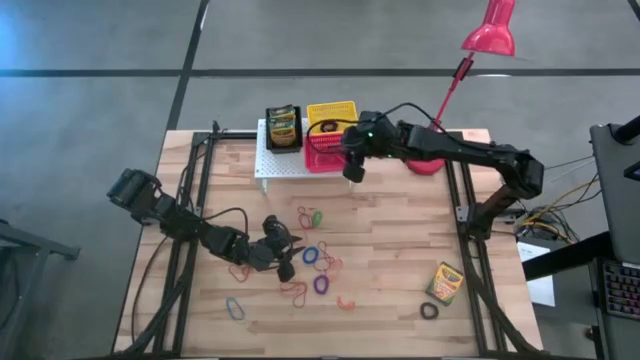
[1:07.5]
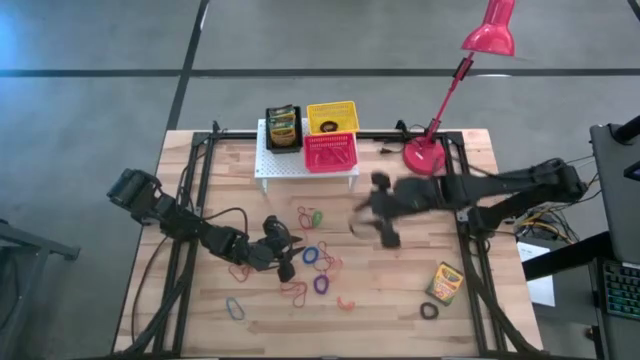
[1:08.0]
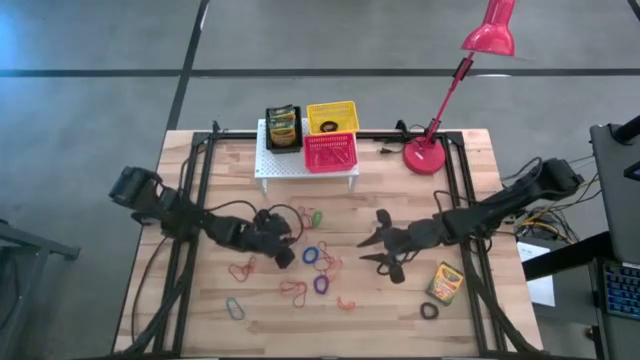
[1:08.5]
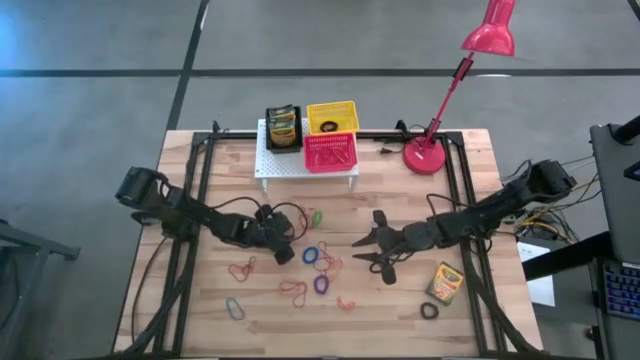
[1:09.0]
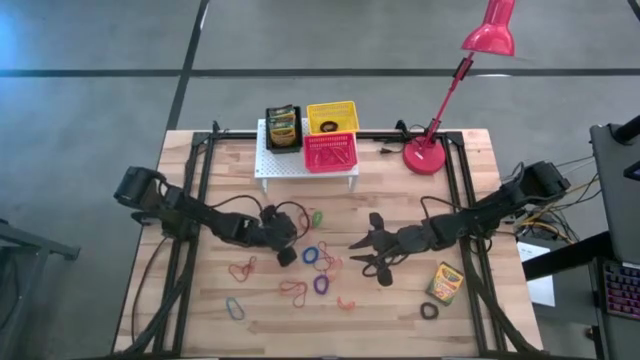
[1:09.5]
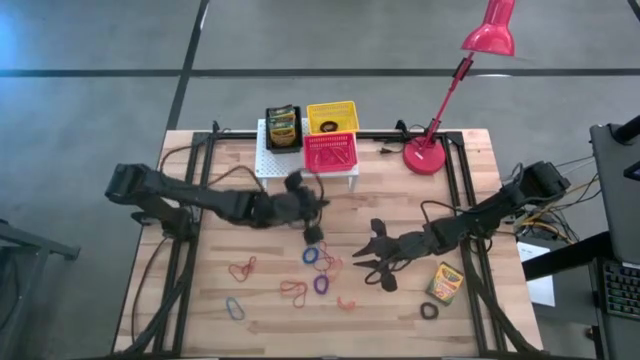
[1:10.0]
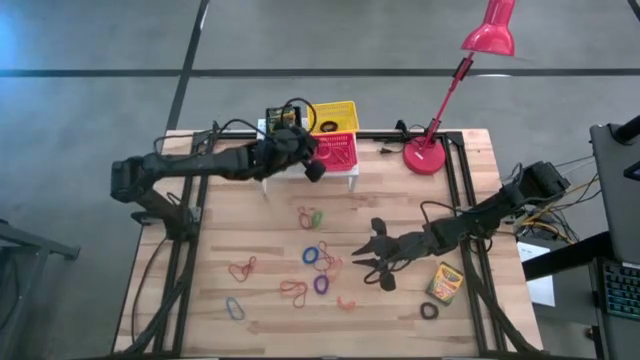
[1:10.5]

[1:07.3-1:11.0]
Task: Pick & Place Office Desk Supplies
Put the orange rubber band into the red bin on the shelf

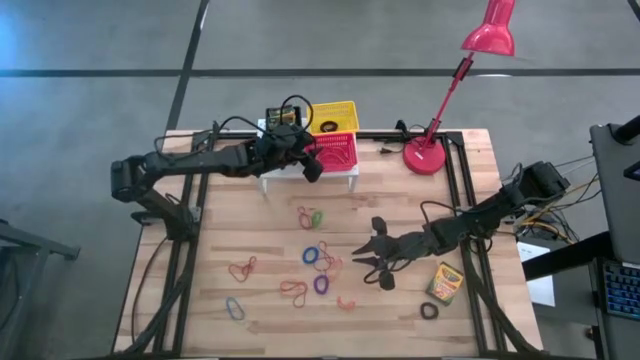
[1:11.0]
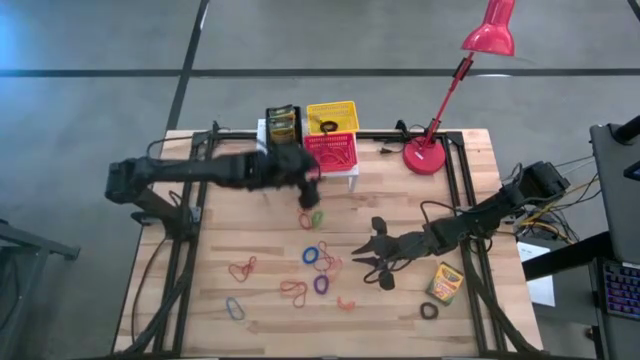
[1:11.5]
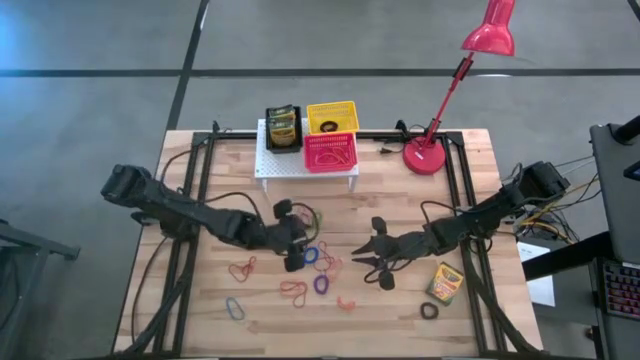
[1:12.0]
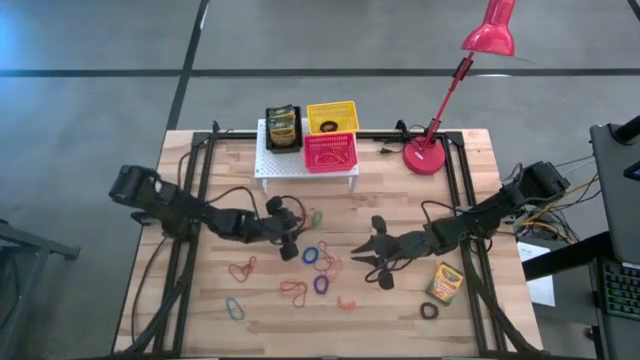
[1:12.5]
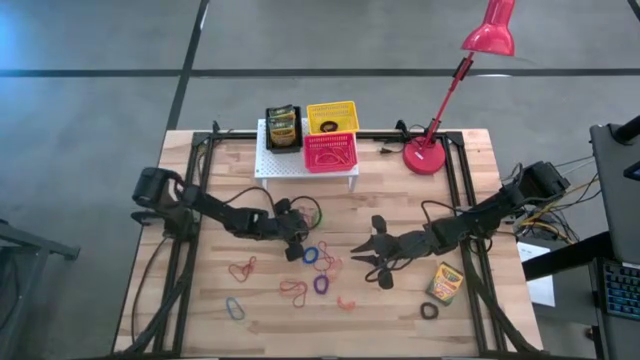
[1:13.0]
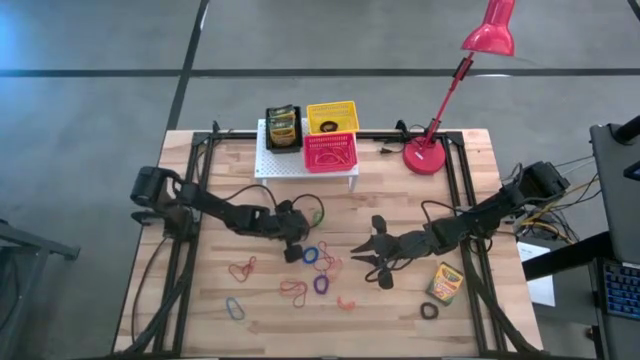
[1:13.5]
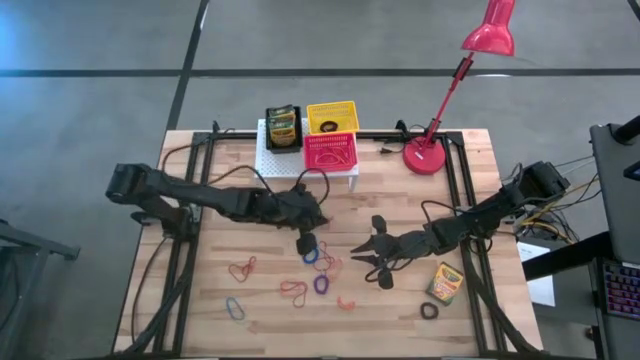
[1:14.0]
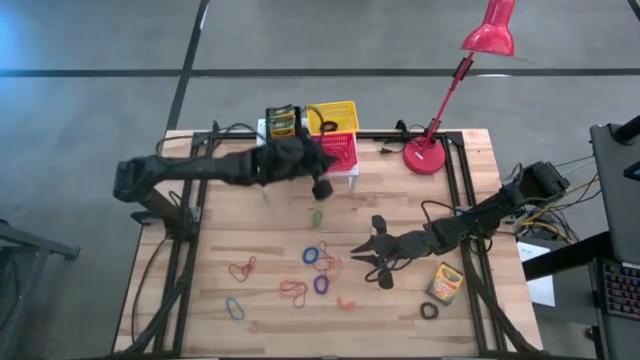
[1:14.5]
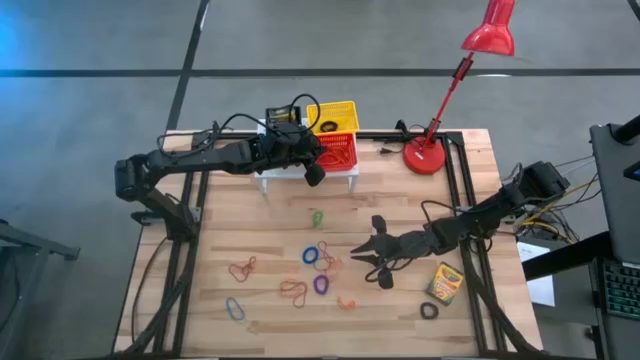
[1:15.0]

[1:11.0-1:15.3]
Put the red rubber band into the red bin on the shelf

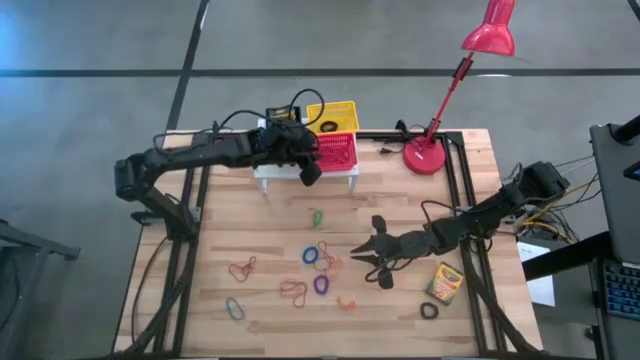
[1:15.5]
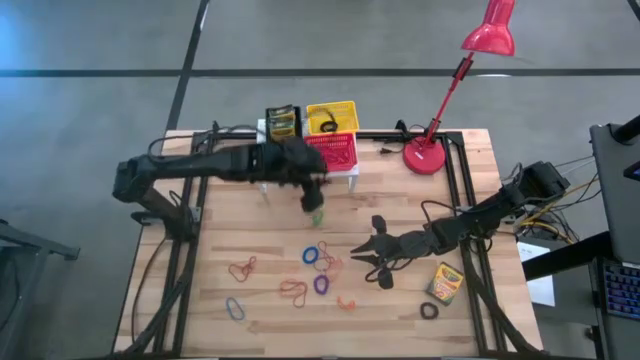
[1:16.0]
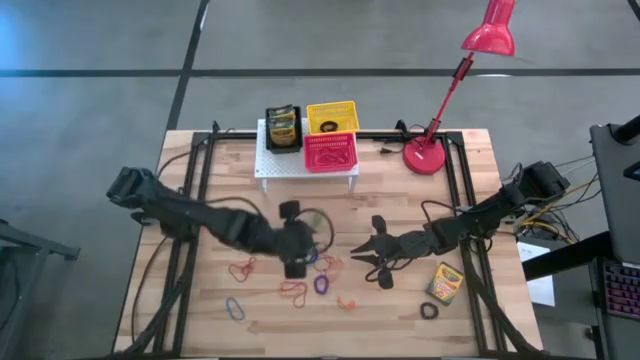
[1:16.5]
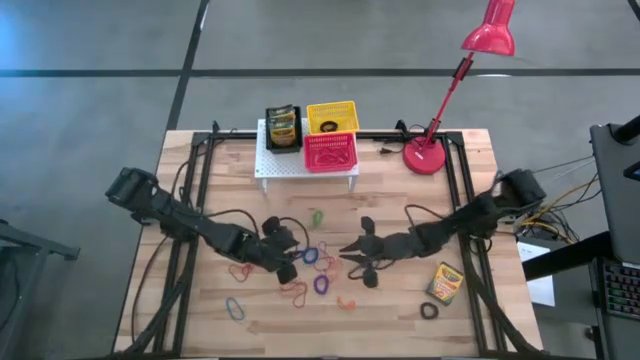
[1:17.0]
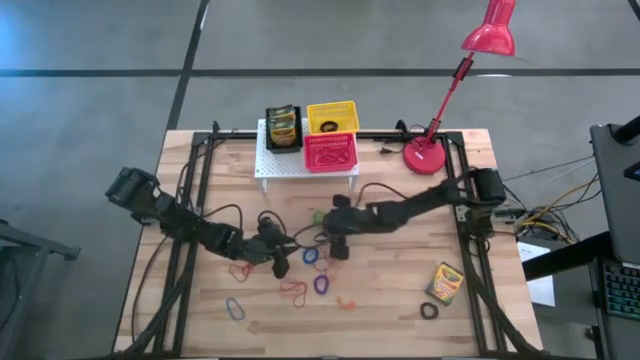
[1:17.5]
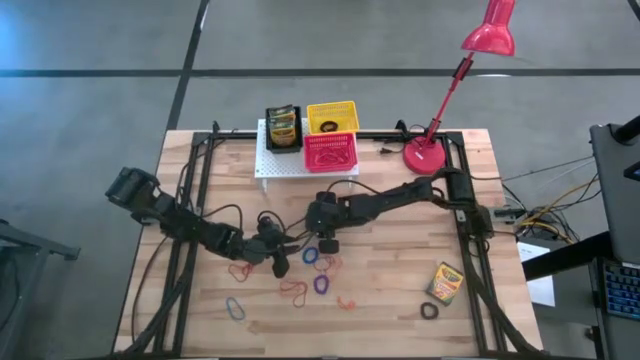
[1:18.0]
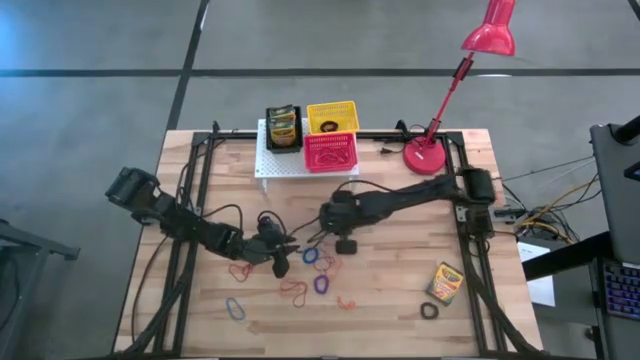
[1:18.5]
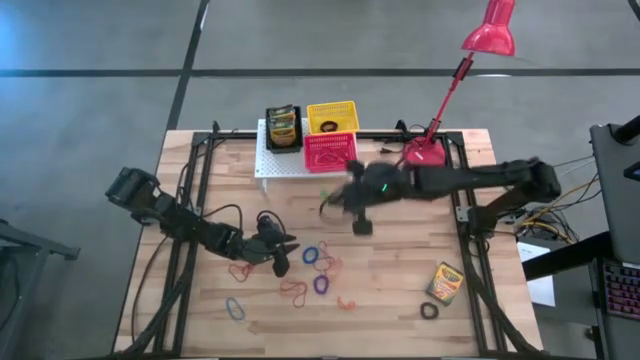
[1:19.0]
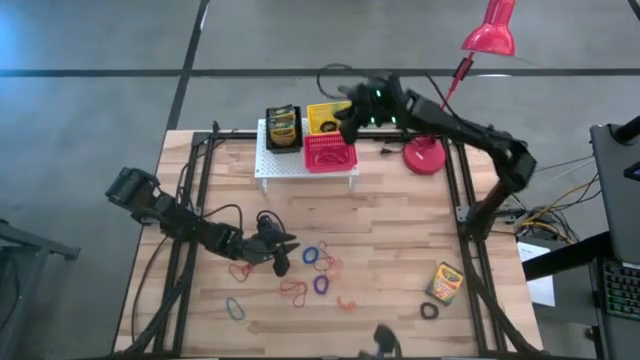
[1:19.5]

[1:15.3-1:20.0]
Put the green spring keychain into the yellow bin on the shelf

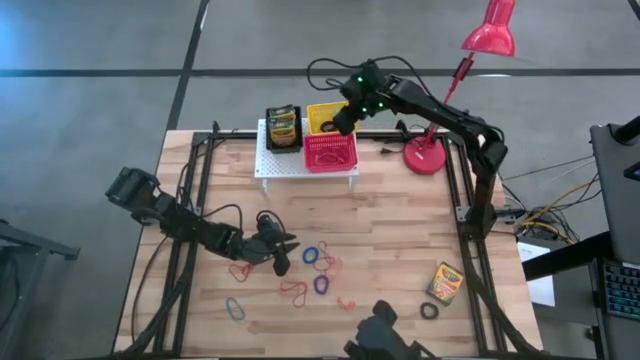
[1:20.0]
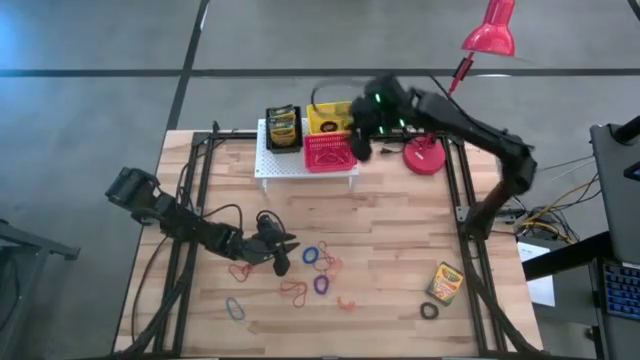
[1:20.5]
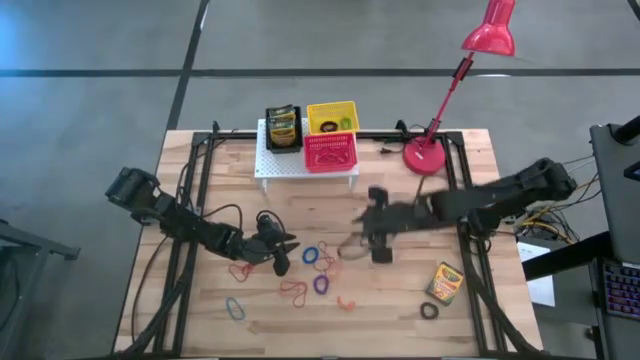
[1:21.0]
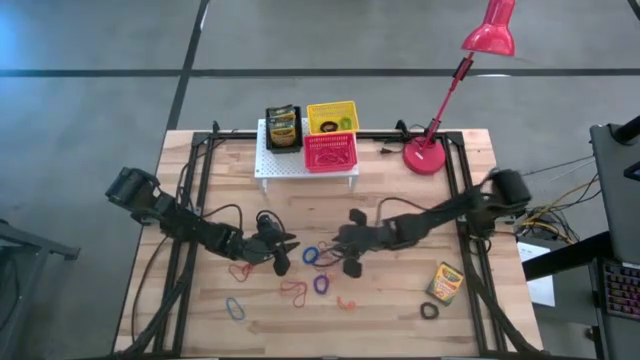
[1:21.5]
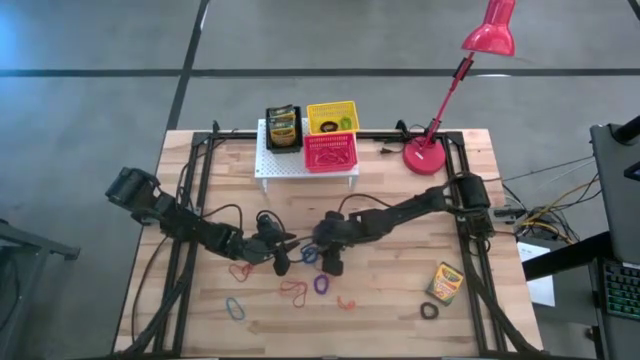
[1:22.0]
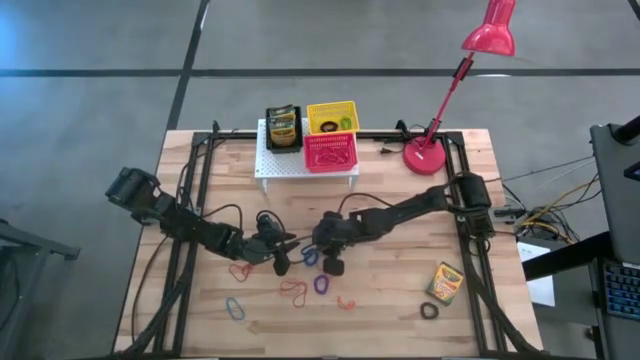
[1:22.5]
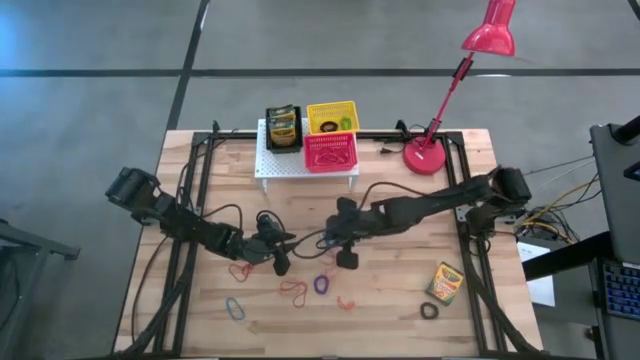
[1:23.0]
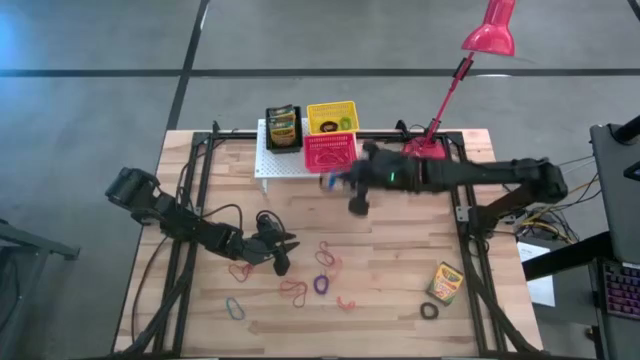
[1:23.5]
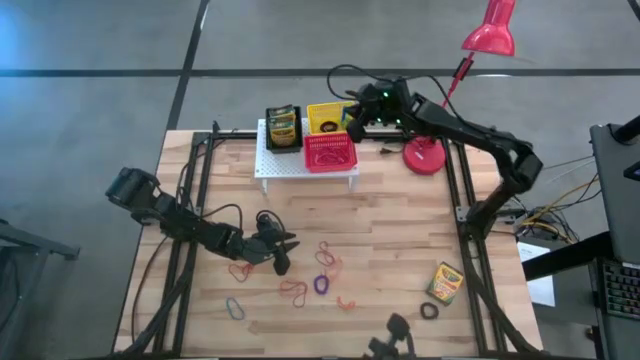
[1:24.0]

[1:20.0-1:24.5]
Put the blue spring keychain into the yellow bin on the shelf

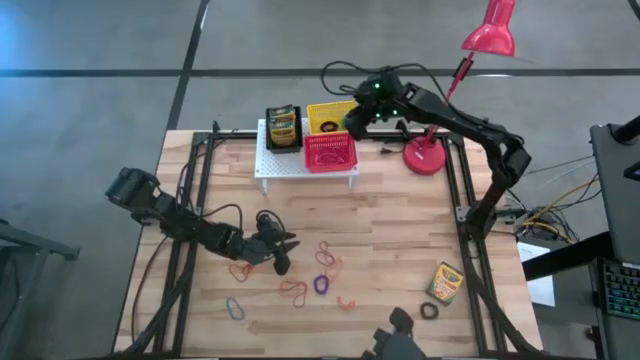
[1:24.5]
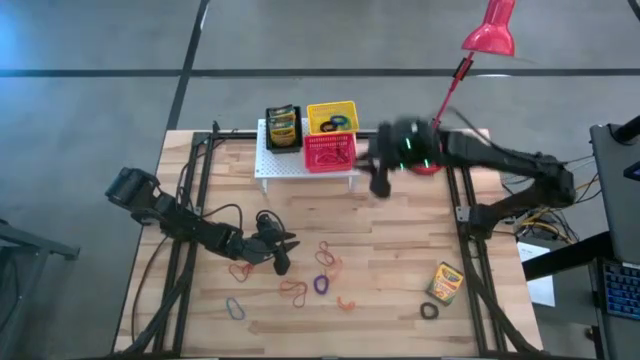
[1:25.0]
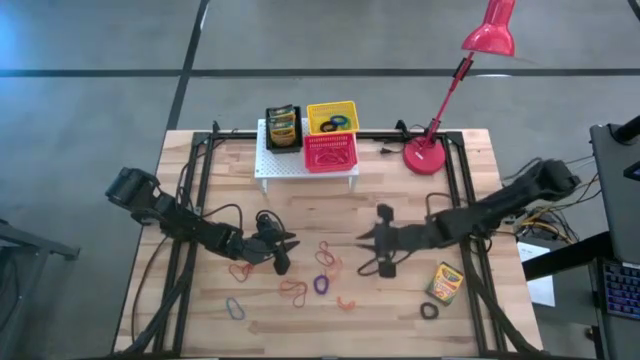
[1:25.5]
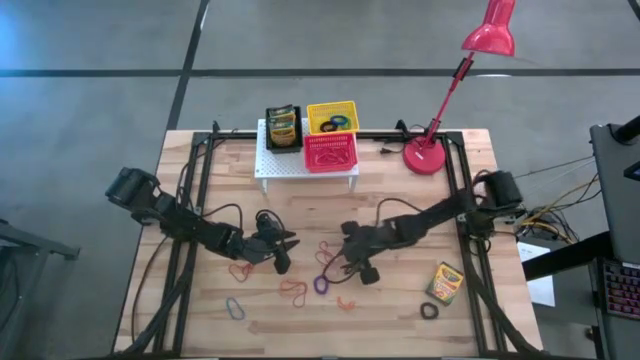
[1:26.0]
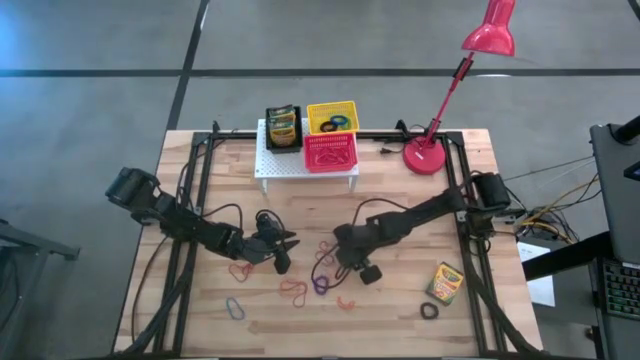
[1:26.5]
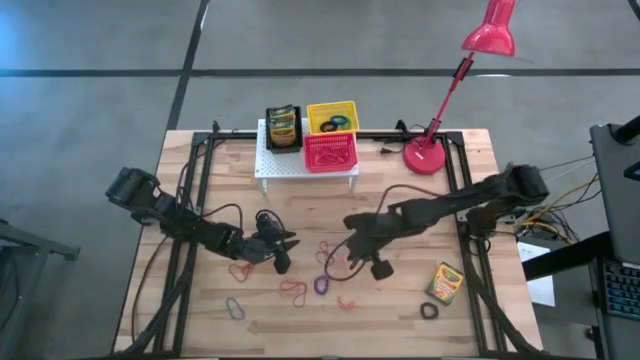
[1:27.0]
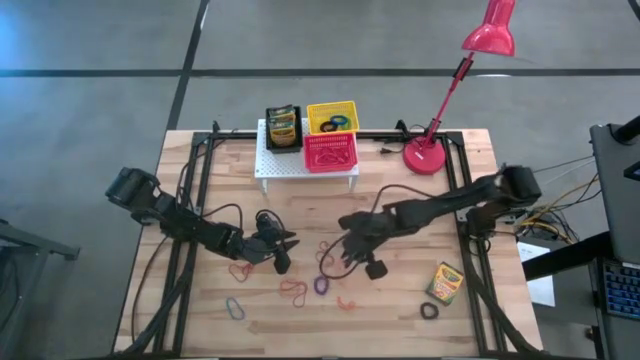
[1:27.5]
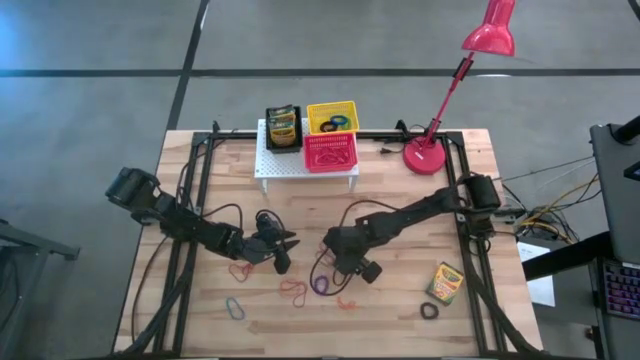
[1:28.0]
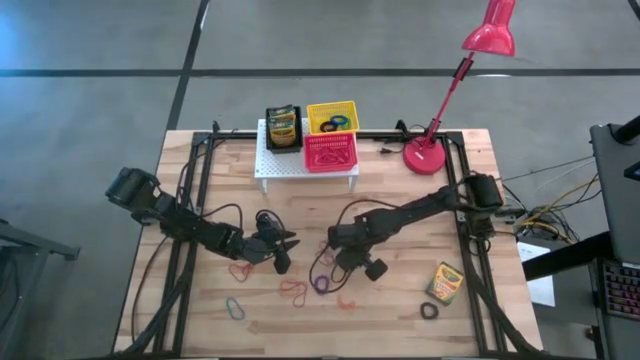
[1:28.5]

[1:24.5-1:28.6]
Put the orange rubber band into the red bin on the shelf

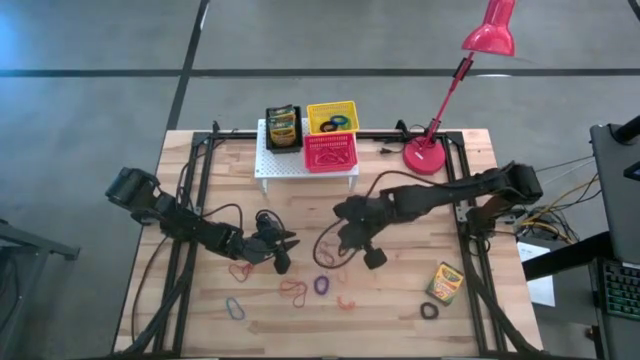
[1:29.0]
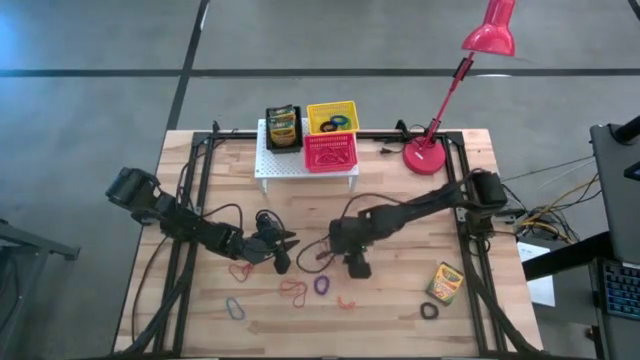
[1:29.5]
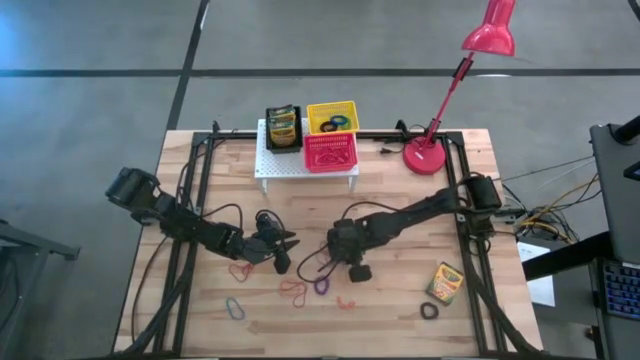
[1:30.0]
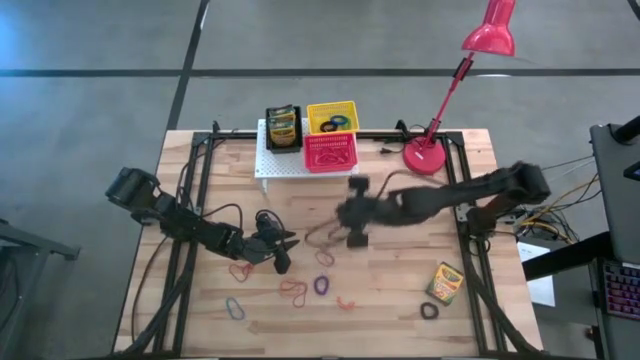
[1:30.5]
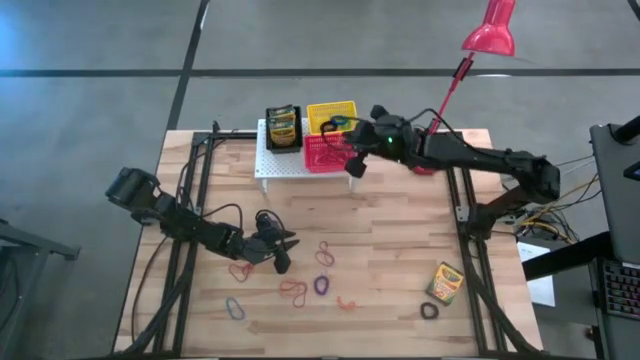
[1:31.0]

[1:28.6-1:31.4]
Put the orange rubber band into the red bin on the shelf
